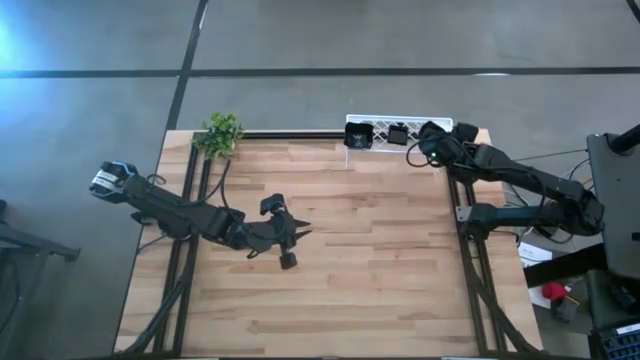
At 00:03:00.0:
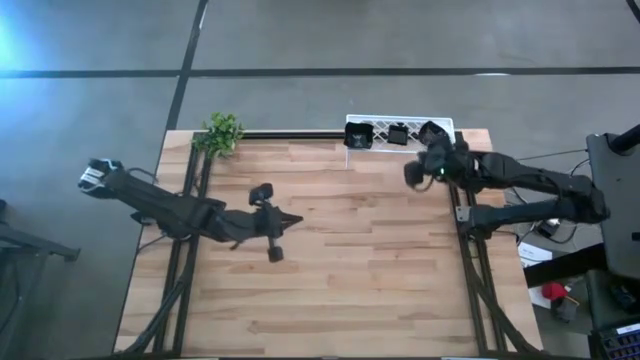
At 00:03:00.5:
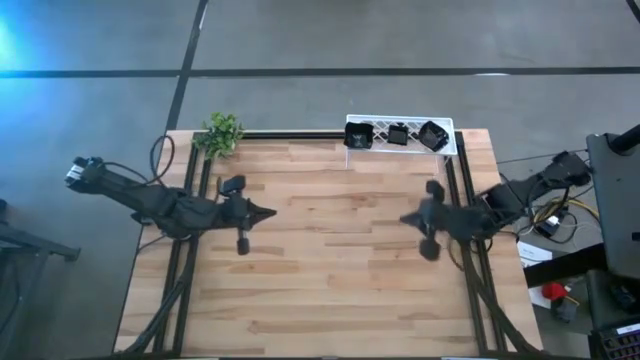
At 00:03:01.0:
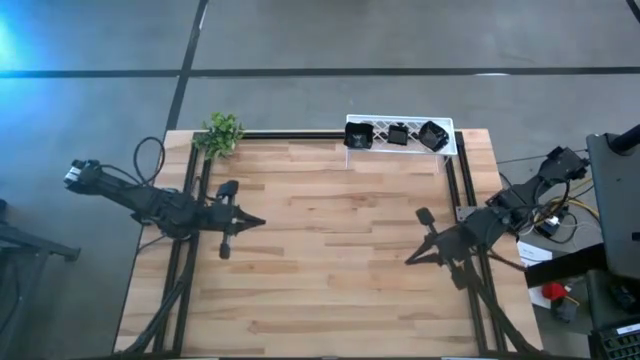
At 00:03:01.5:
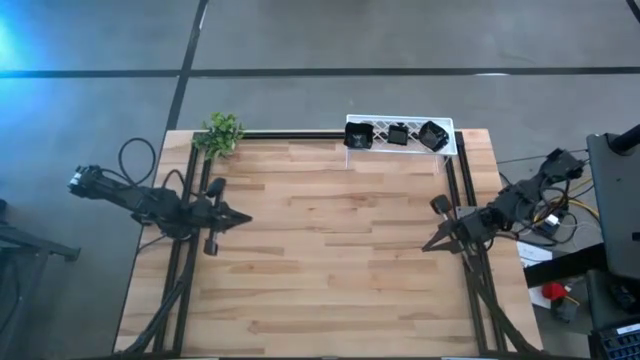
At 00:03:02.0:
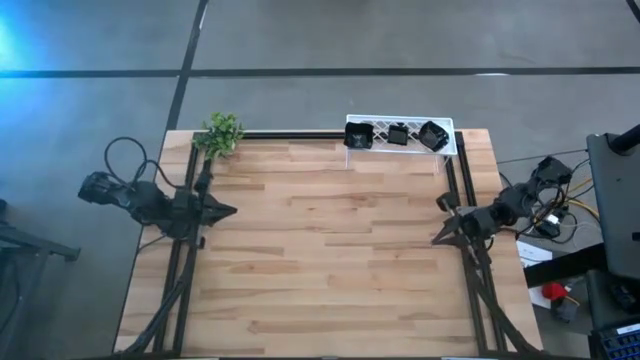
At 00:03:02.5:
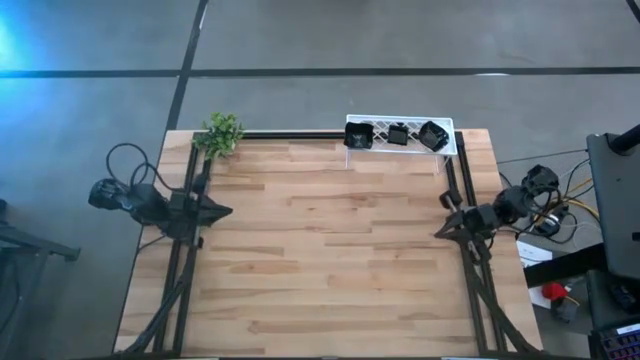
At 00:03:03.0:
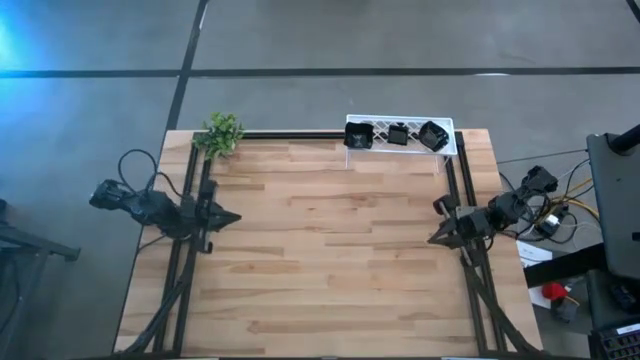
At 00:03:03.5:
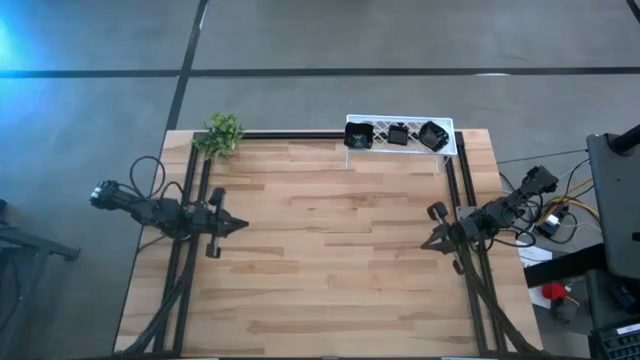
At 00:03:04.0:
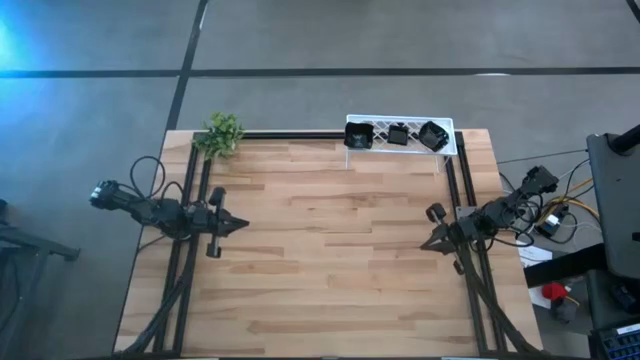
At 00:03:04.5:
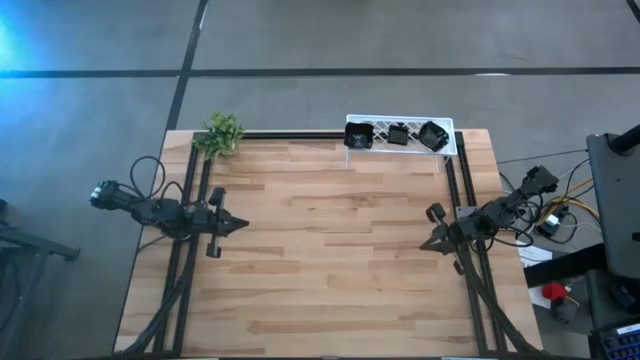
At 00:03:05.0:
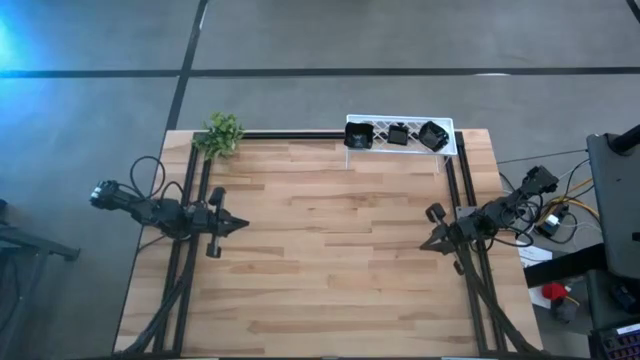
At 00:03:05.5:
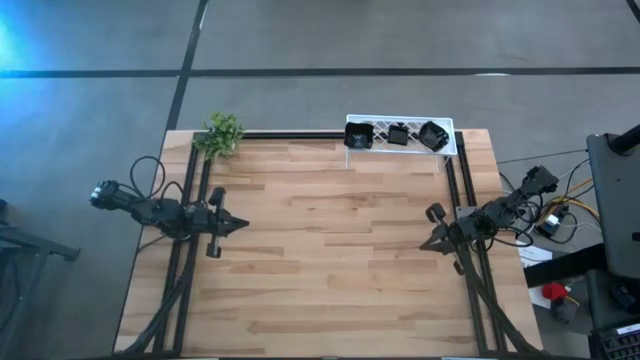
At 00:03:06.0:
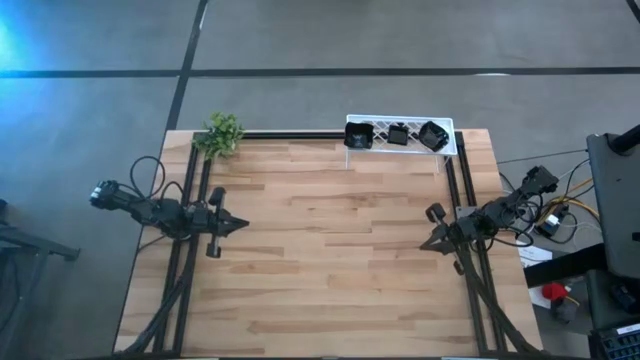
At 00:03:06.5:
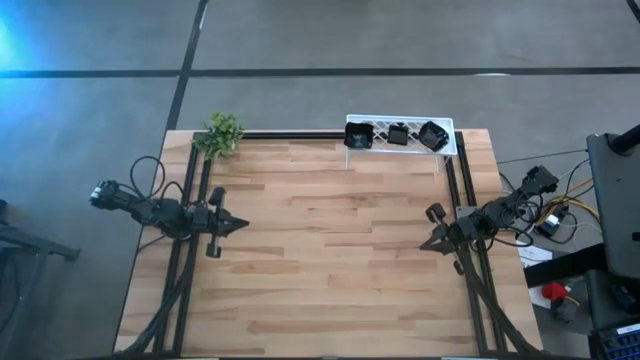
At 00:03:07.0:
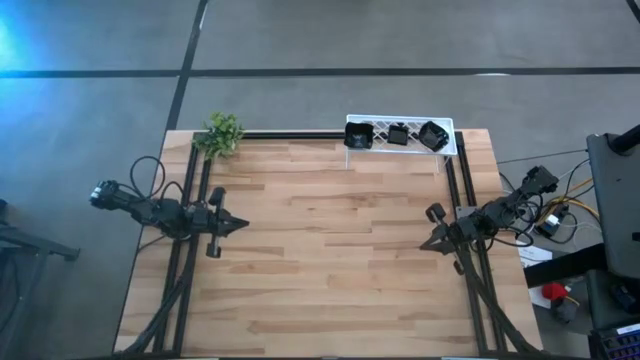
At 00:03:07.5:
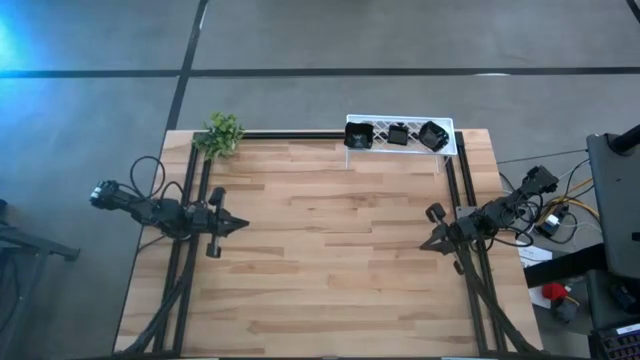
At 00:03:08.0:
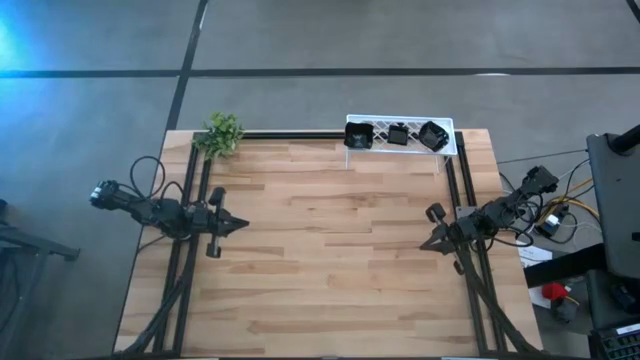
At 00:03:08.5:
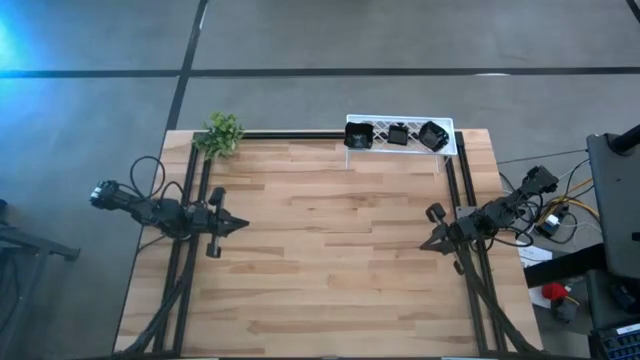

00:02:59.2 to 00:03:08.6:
Task: Pick & Place Mini shaped plates
Return to Home Position

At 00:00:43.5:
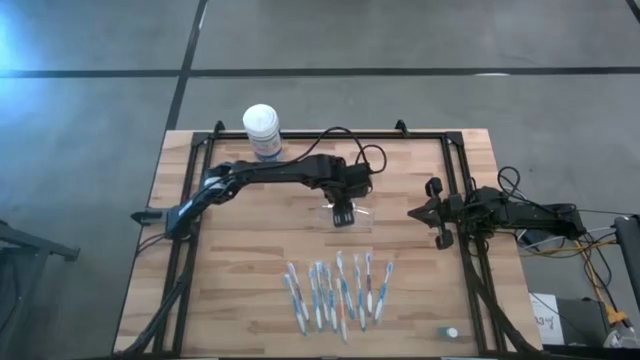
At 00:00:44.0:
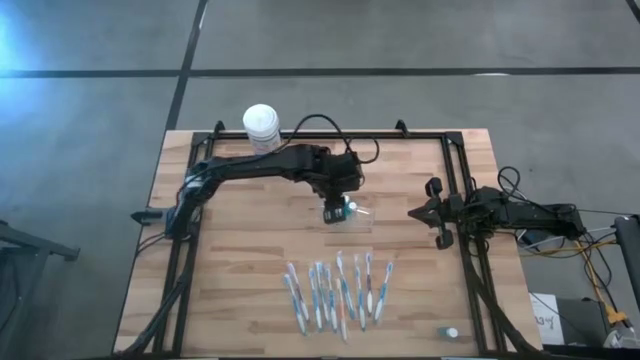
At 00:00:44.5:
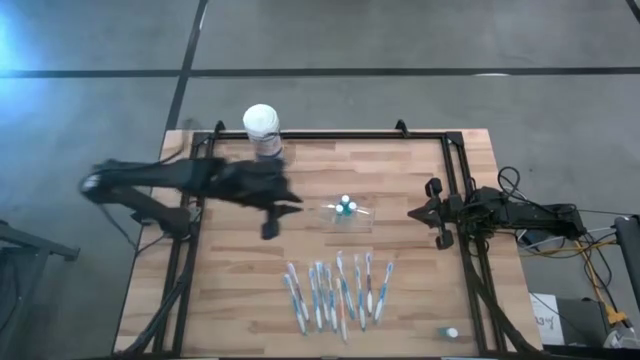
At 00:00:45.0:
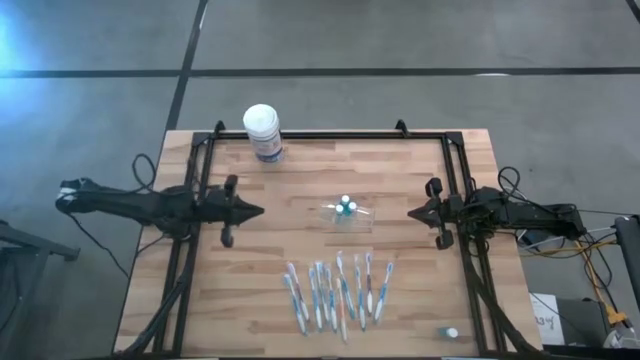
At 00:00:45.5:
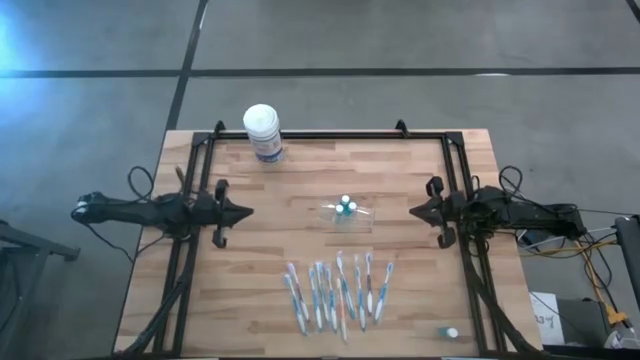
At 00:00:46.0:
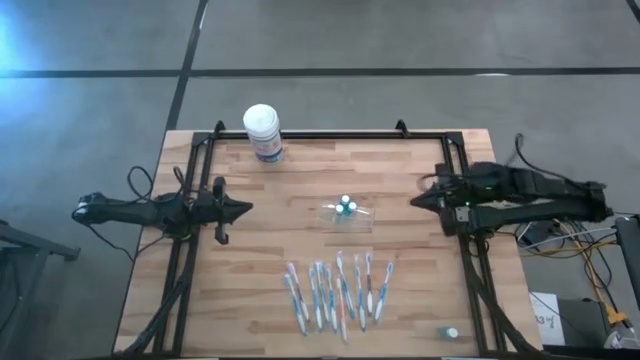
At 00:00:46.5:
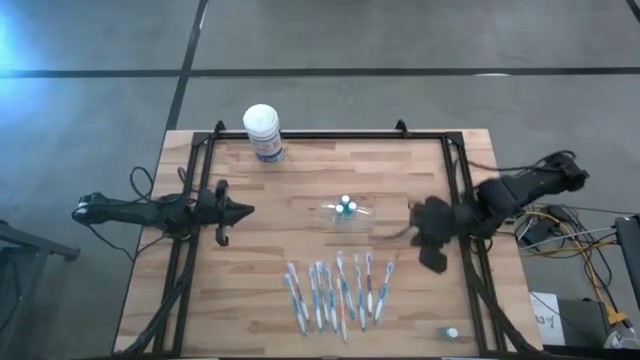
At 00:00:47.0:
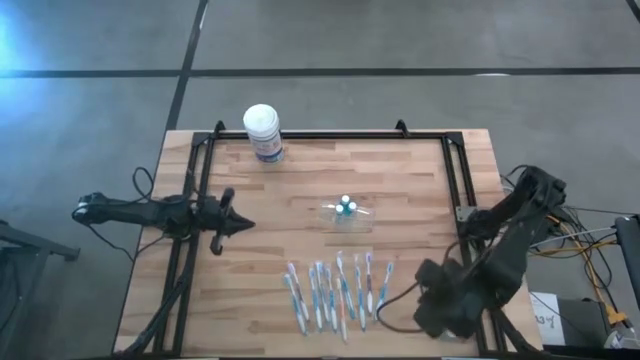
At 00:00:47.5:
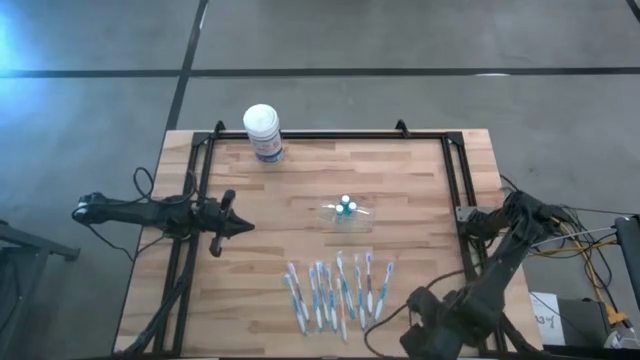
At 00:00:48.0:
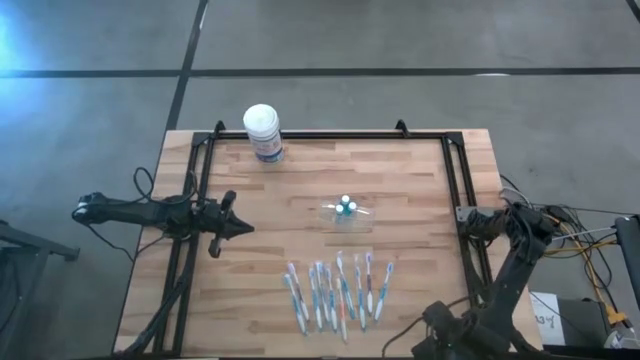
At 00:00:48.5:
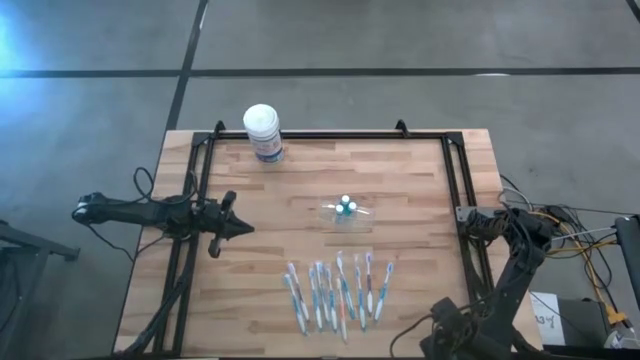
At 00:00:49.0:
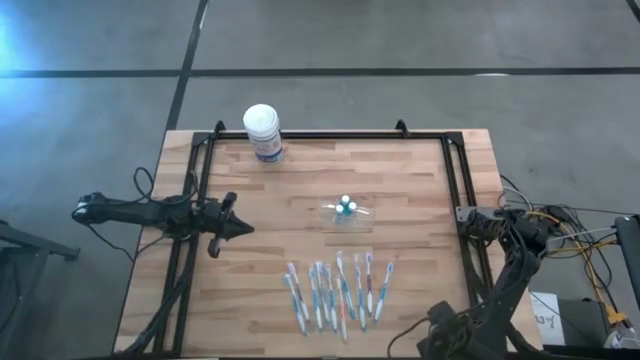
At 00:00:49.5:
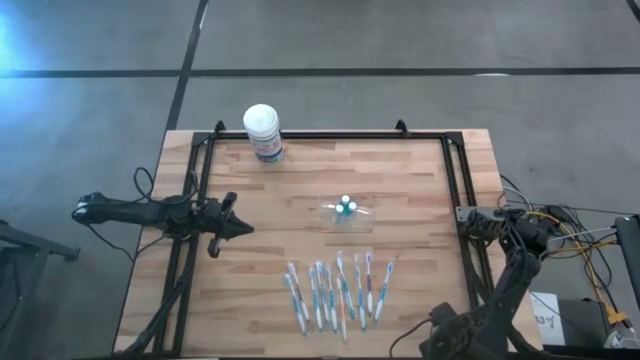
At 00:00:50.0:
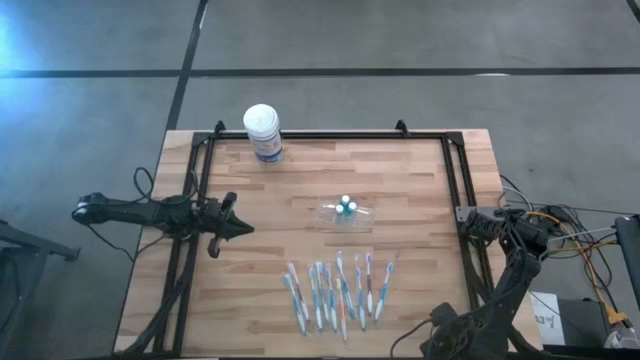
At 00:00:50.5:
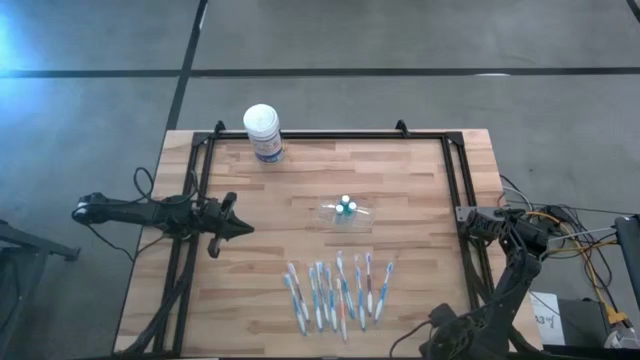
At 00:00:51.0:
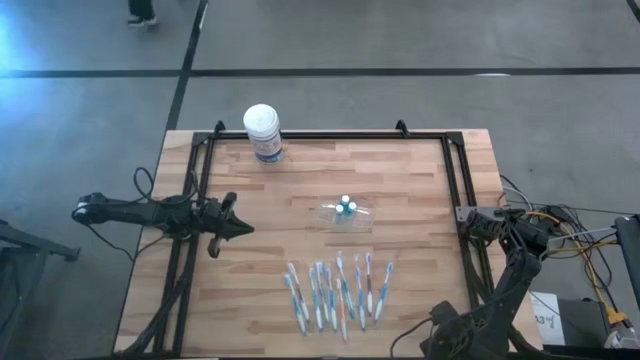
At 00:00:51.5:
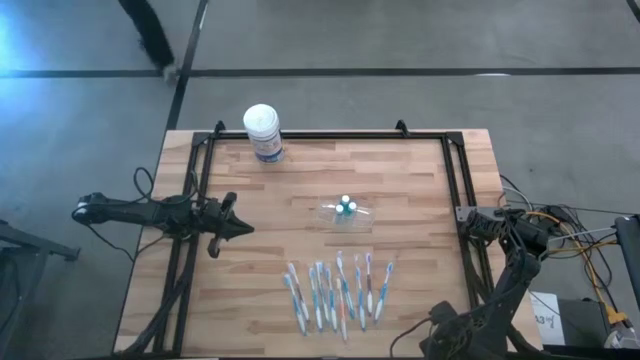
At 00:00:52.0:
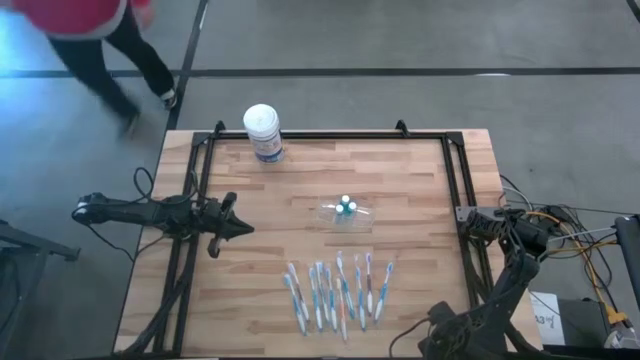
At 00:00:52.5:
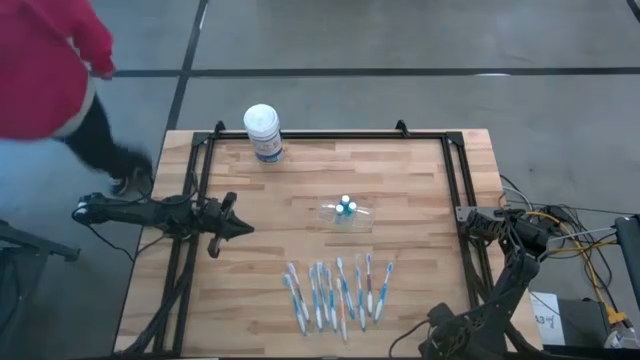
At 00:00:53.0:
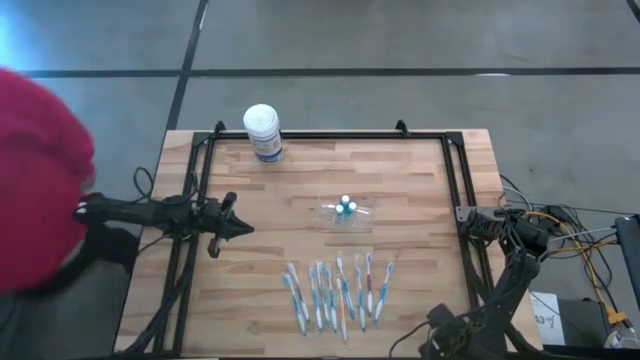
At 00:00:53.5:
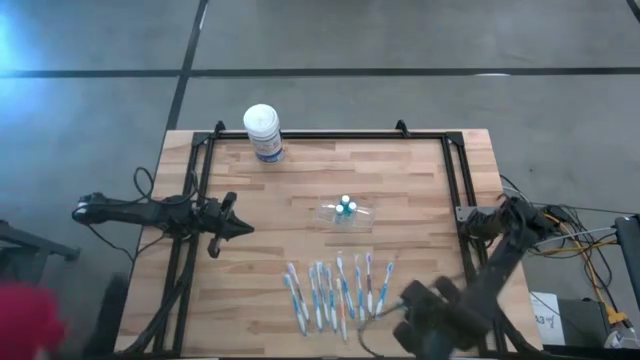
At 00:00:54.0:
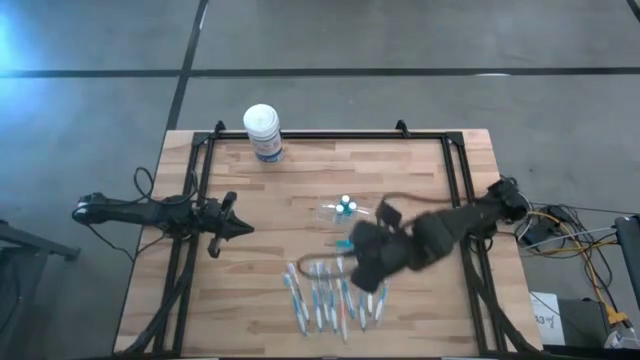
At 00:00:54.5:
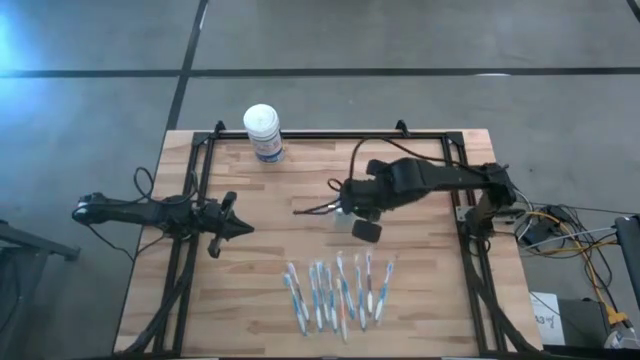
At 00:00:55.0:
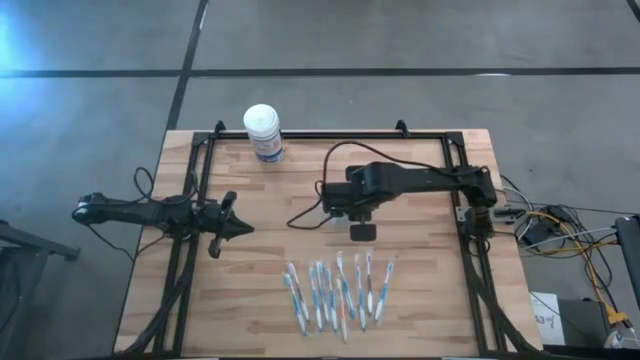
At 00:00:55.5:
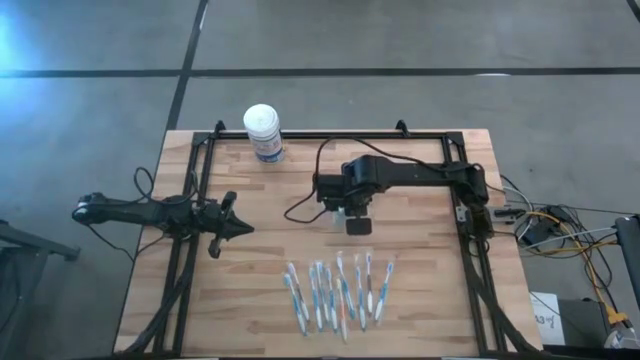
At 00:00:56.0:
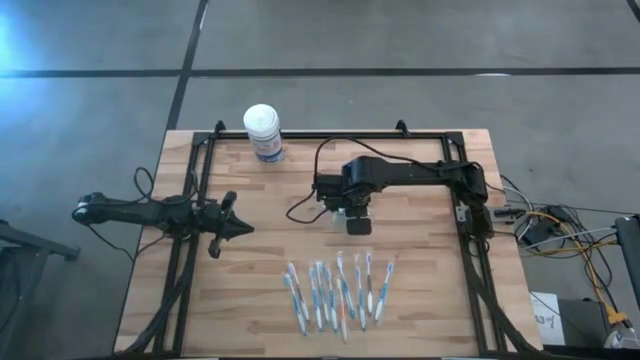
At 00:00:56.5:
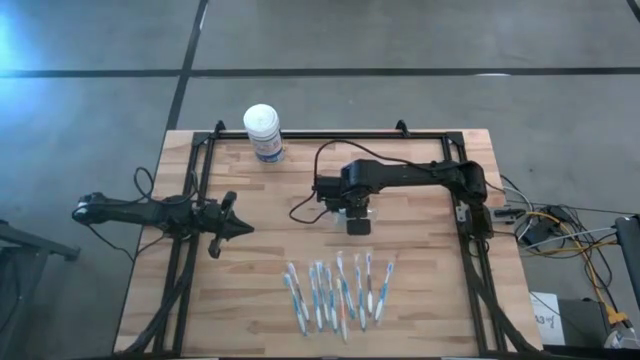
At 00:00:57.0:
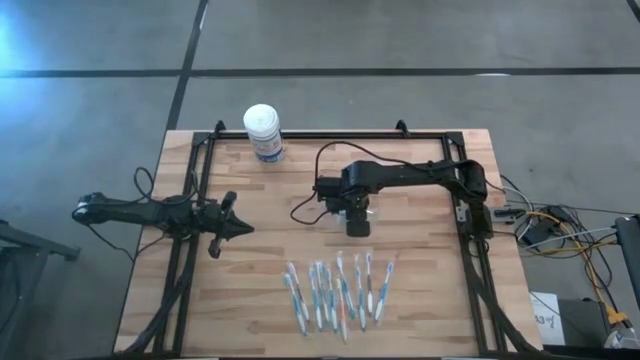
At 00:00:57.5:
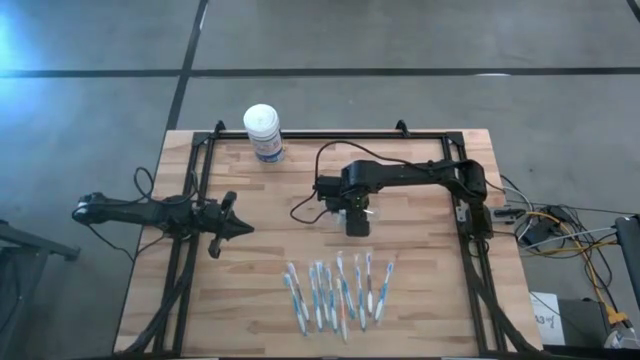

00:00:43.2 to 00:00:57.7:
Task: Pick & Place toothbrushing station
Put the blue mouthwash into the transparent organizer
